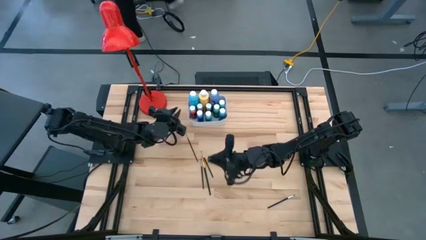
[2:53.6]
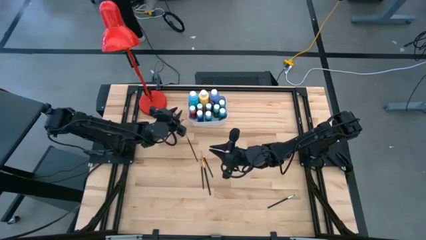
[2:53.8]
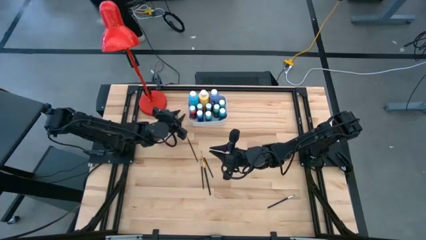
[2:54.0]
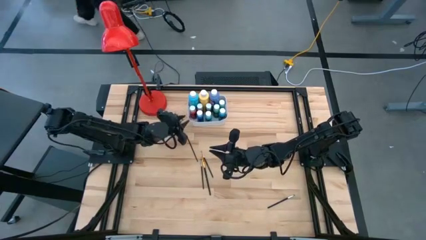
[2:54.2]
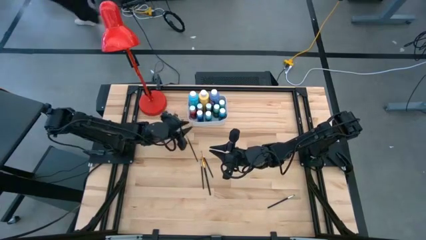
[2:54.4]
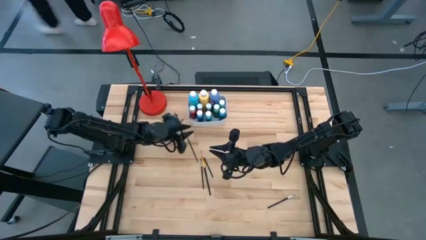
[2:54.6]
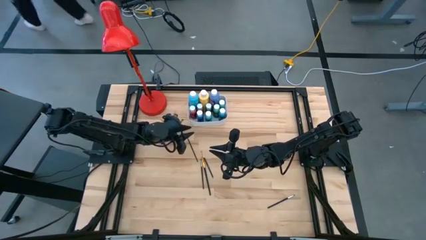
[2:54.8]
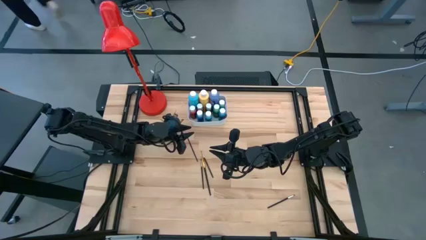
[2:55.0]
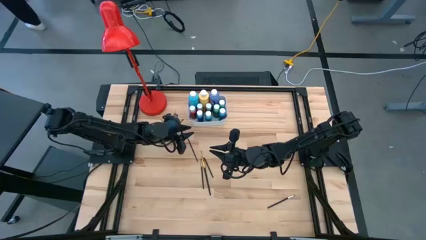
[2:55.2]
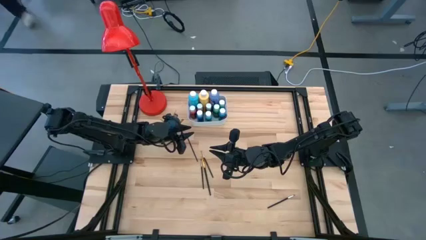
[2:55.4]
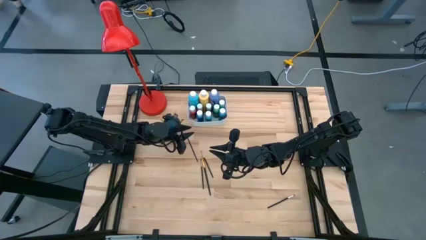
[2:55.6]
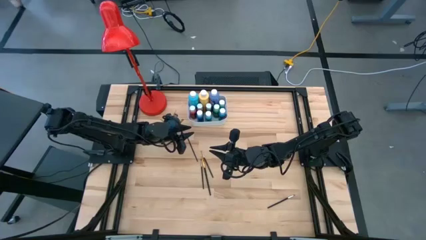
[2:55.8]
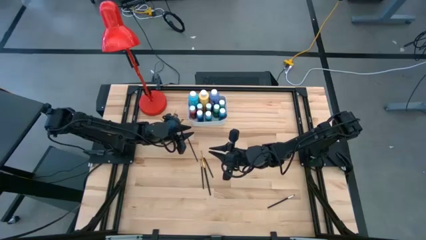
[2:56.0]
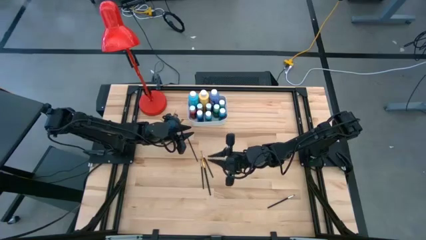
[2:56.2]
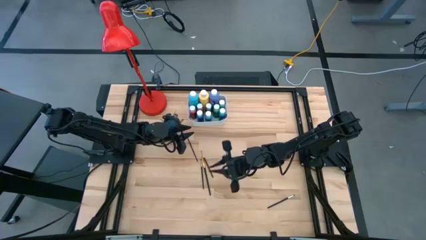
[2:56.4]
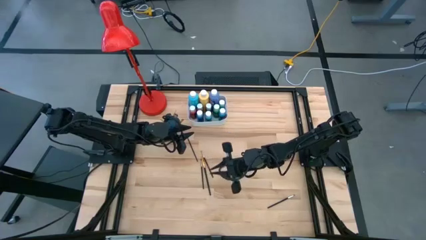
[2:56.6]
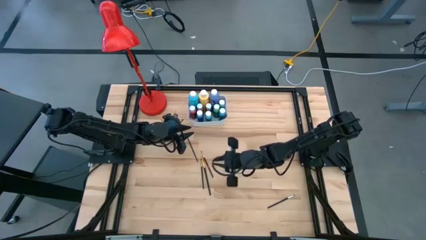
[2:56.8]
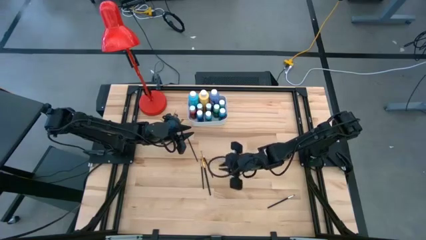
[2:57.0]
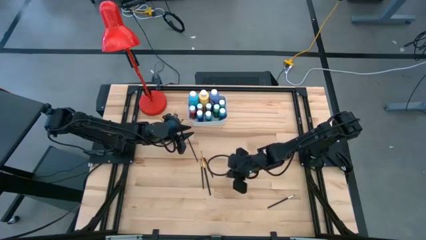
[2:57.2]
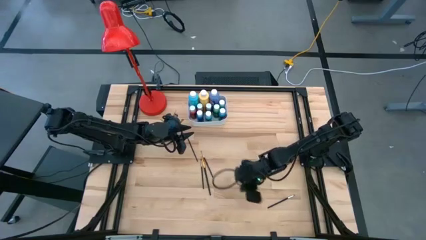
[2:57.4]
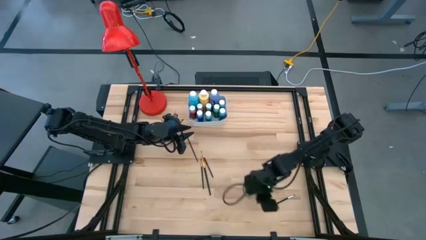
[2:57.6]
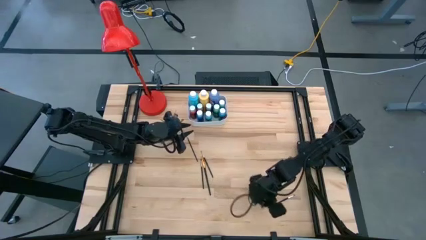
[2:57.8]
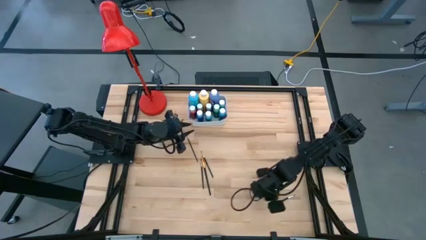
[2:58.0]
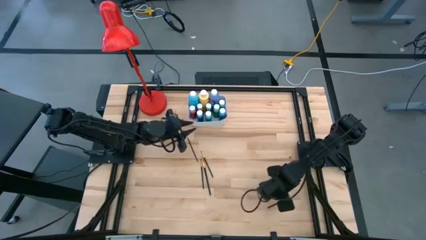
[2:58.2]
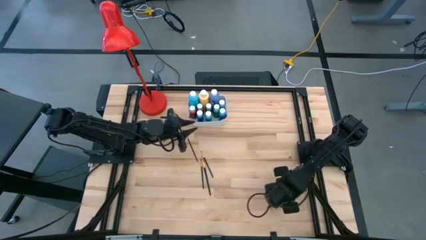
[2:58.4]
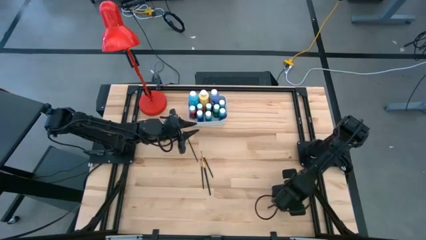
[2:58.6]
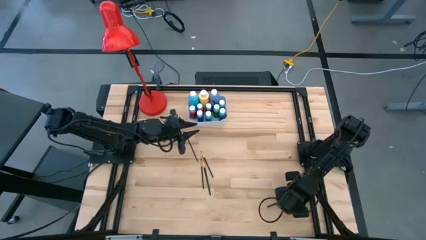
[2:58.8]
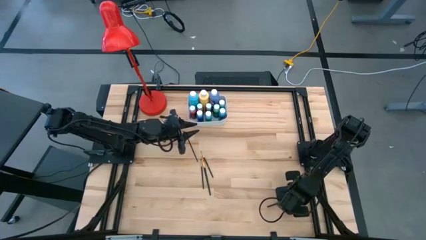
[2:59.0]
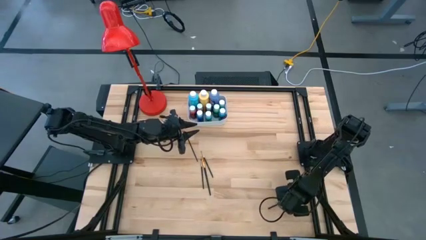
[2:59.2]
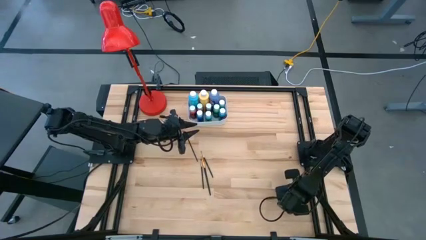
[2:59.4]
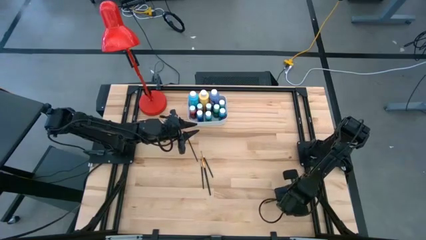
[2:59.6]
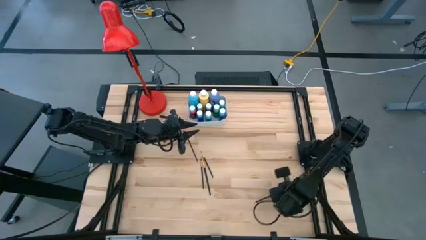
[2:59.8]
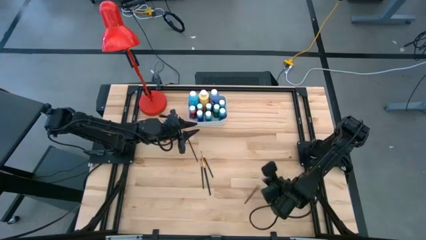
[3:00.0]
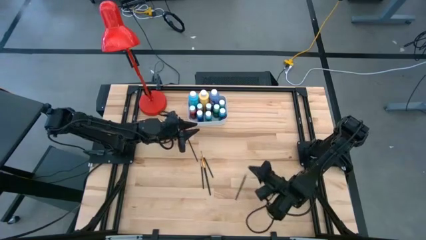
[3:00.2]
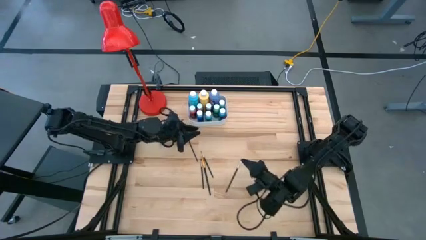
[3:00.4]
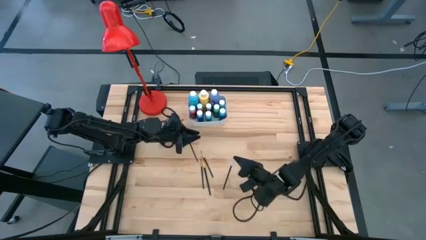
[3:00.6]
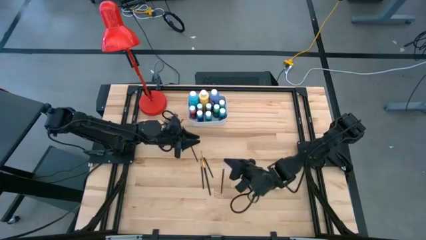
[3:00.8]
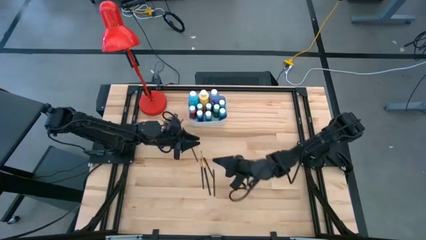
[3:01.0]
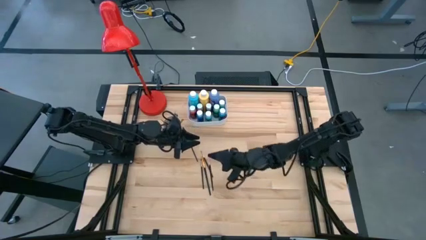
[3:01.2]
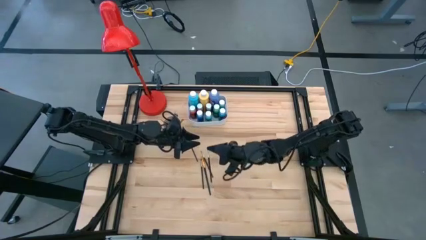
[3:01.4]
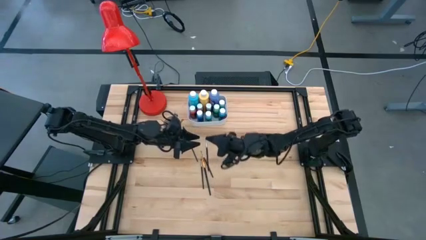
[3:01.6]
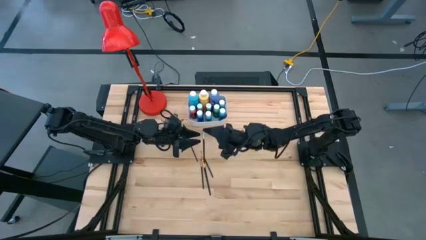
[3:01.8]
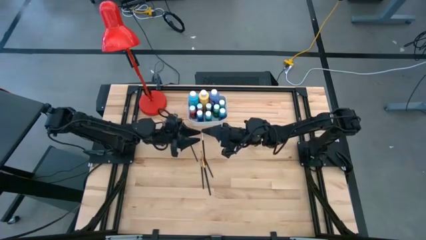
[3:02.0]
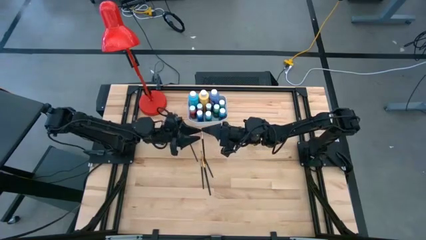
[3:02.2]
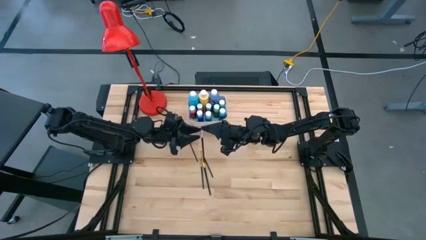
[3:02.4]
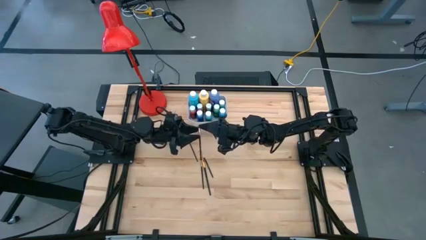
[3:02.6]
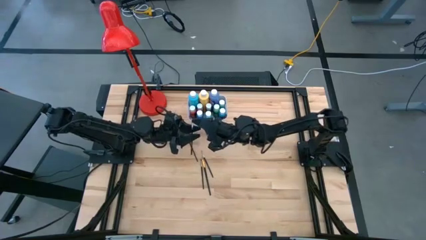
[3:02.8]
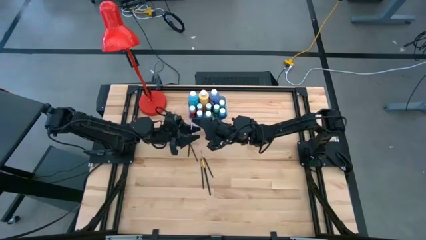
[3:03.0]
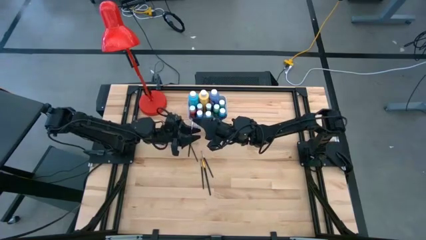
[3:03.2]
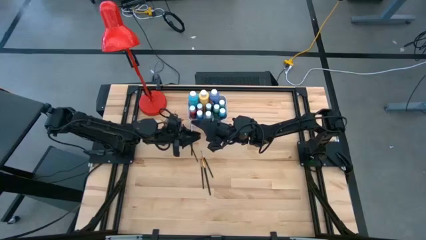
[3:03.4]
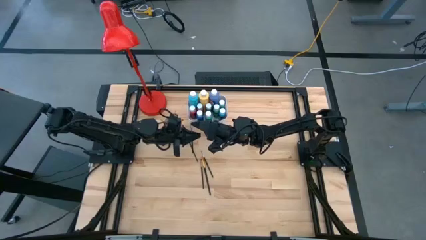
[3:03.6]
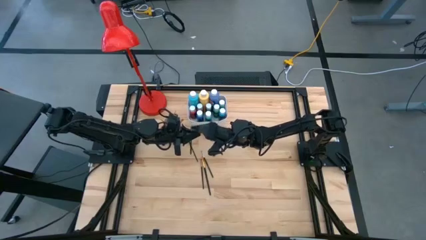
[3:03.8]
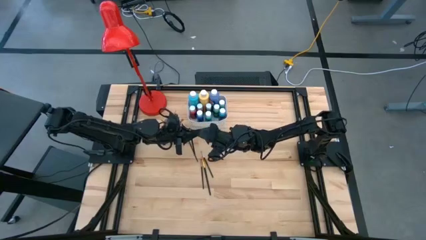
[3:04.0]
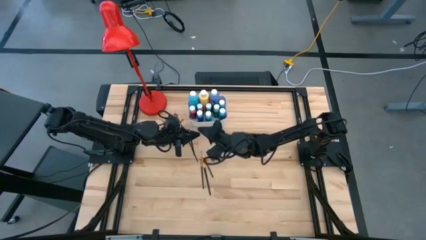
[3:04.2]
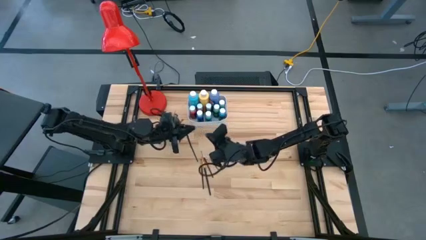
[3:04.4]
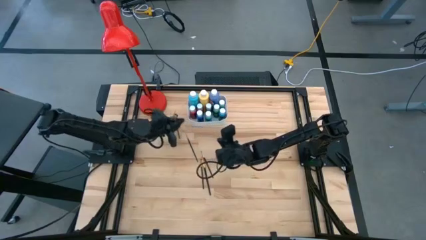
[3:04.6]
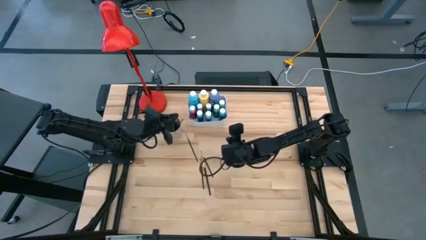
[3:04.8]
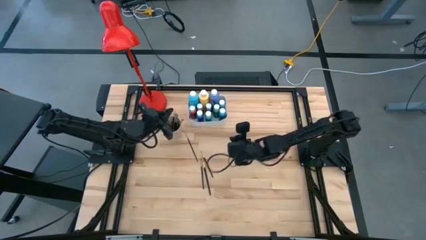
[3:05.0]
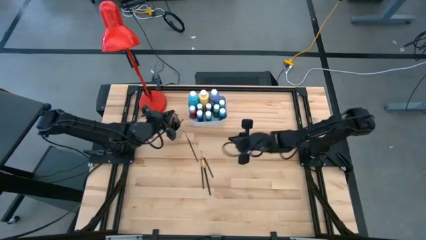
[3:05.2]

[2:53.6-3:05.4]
Task: Pick & Place Paint Supplies
Put the black paint brush into the white cup

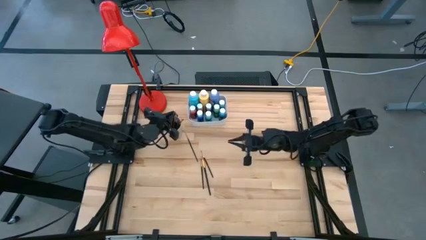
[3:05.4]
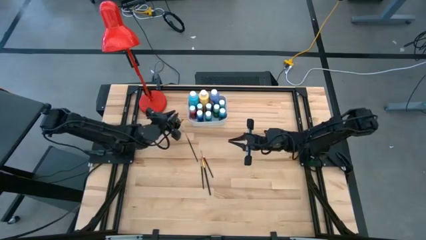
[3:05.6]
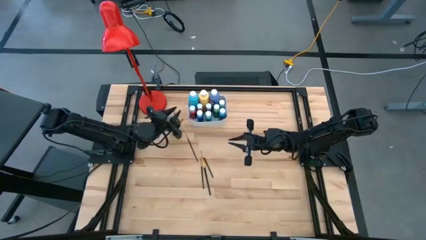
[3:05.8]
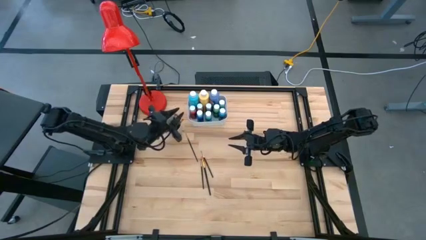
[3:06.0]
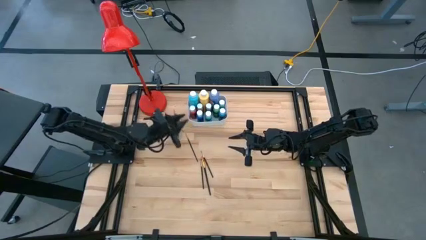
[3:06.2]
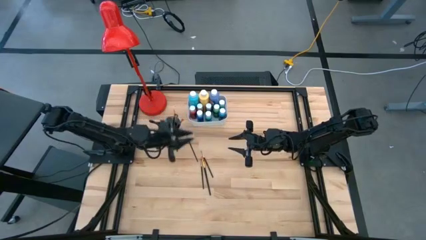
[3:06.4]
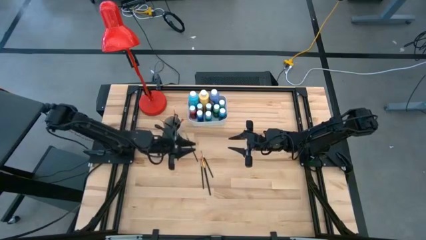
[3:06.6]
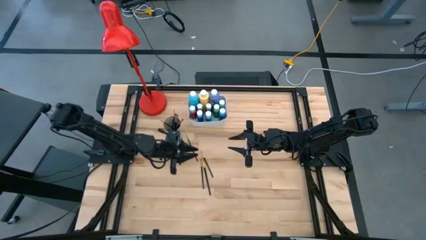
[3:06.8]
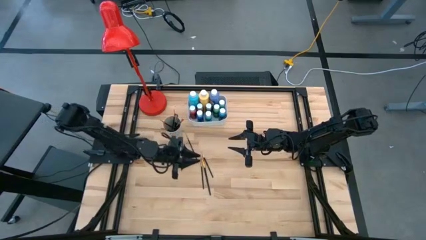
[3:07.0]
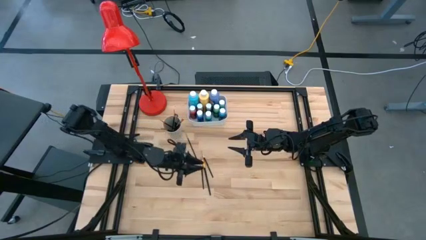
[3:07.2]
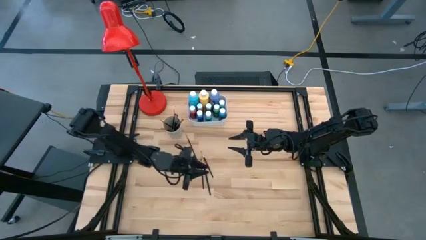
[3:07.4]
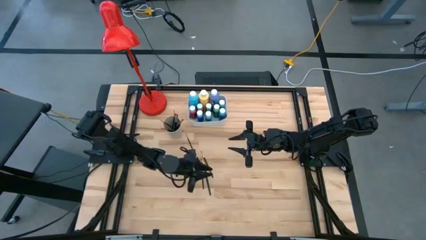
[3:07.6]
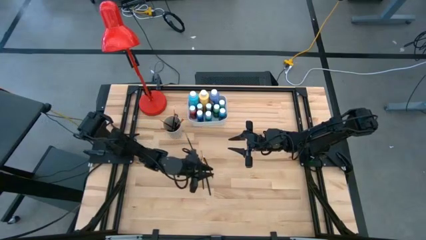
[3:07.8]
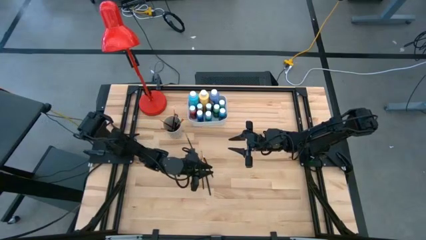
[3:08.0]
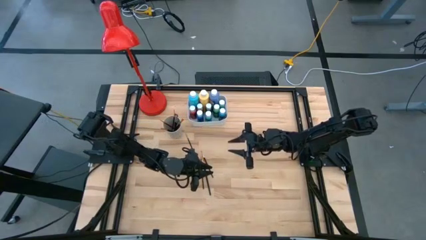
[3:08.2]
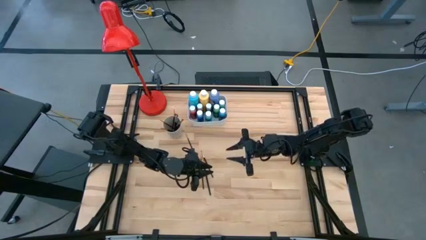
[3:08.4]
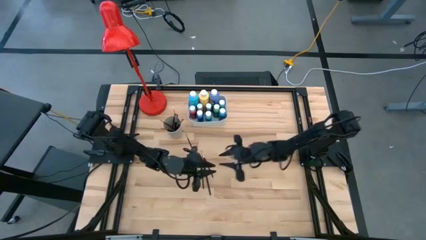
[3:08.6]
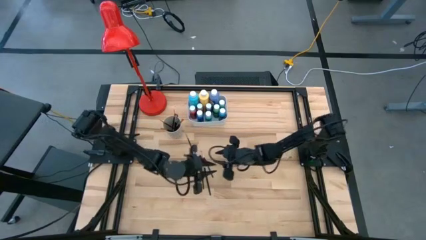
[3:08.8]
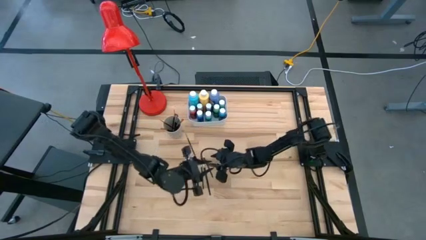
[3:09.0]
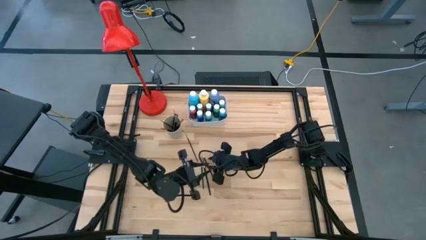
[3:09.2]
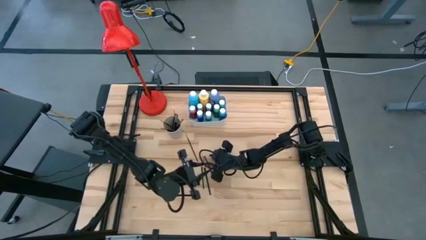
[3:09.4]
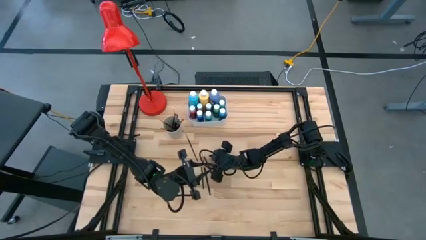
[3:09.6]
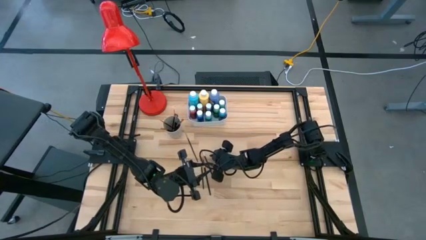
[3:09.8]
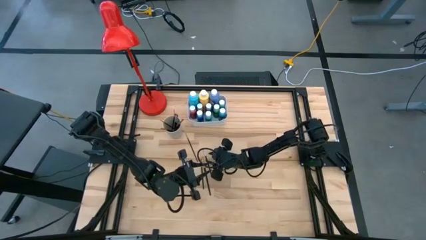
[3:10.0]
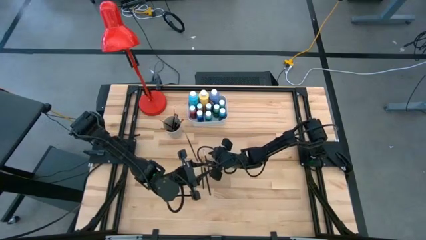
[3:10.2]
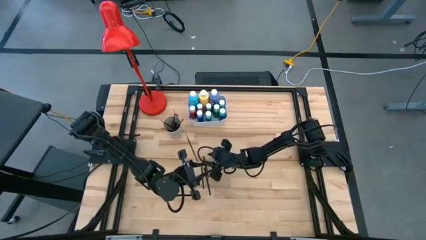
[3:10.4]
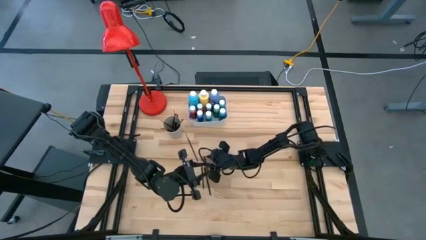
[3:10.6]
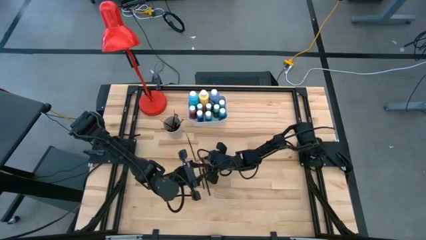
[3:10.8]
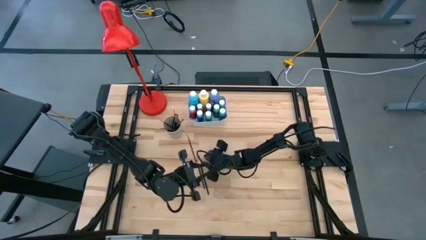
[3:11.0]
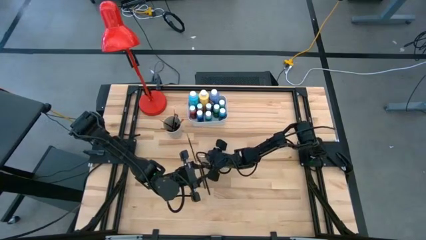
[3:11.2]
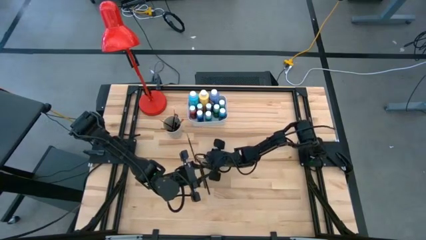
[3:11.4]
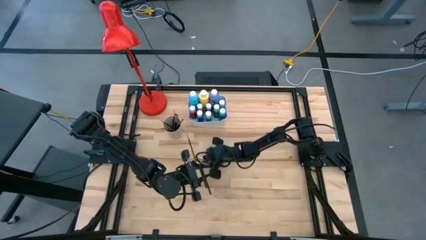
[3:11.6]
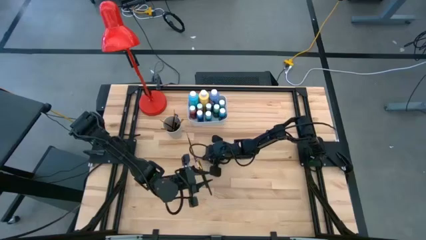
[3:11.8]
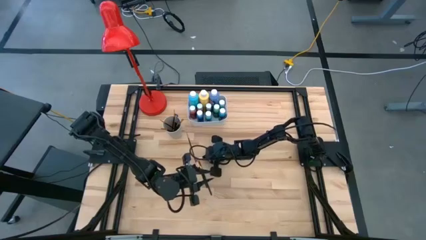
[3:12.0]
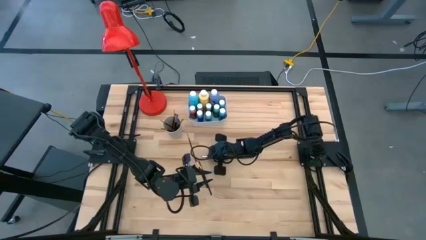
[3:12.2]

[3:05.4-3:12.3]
Put the black paint brush into the white cup
